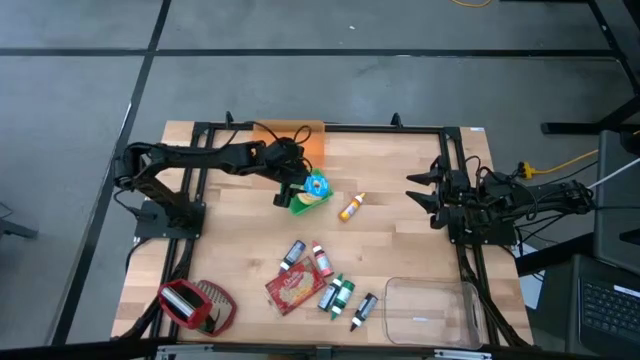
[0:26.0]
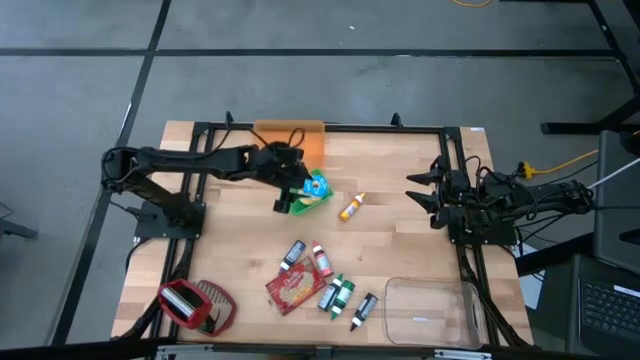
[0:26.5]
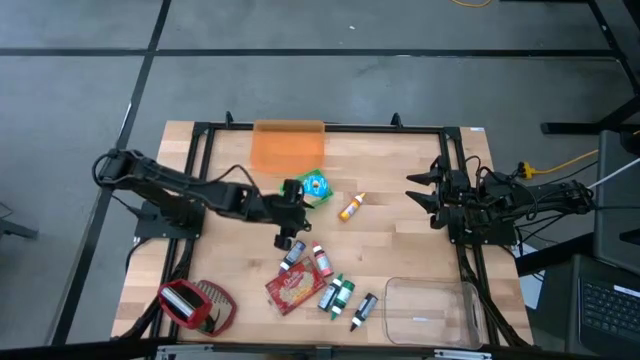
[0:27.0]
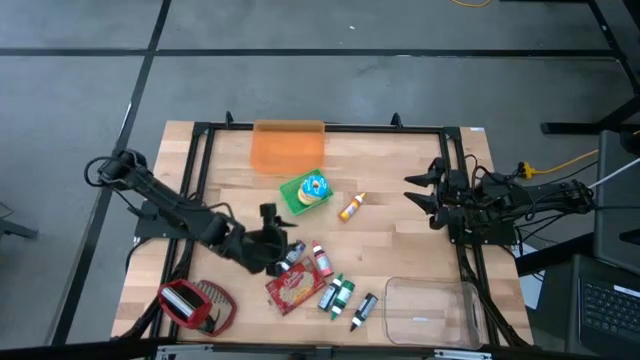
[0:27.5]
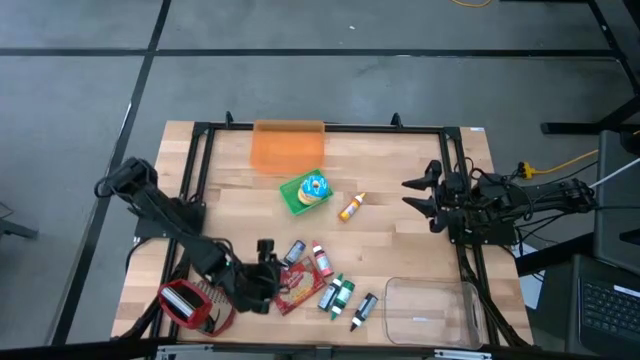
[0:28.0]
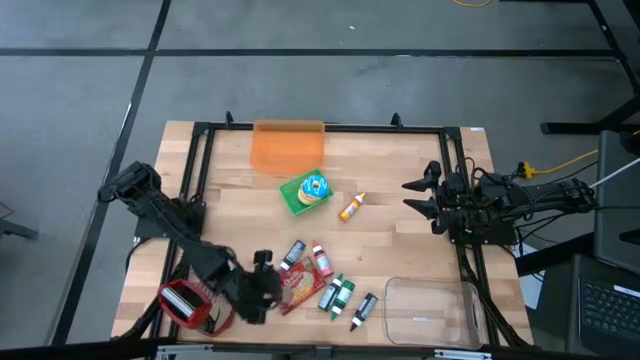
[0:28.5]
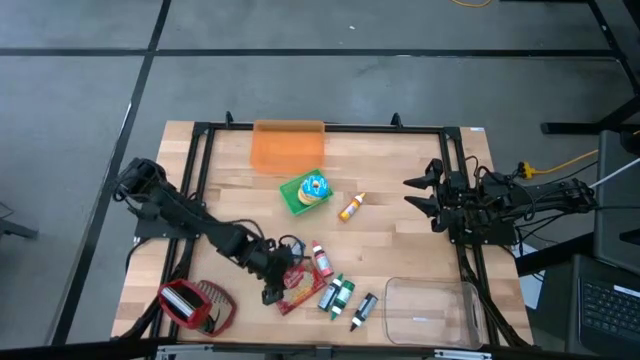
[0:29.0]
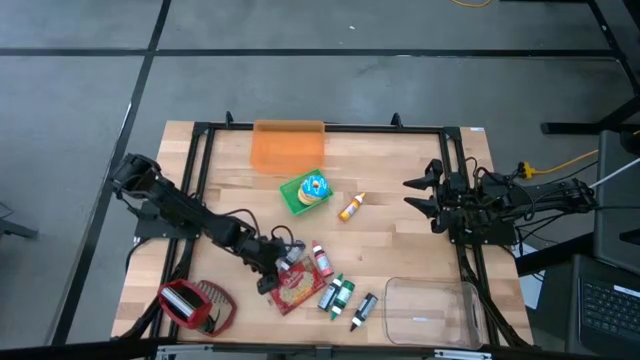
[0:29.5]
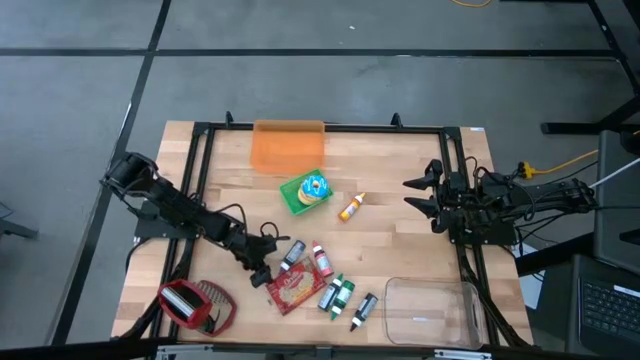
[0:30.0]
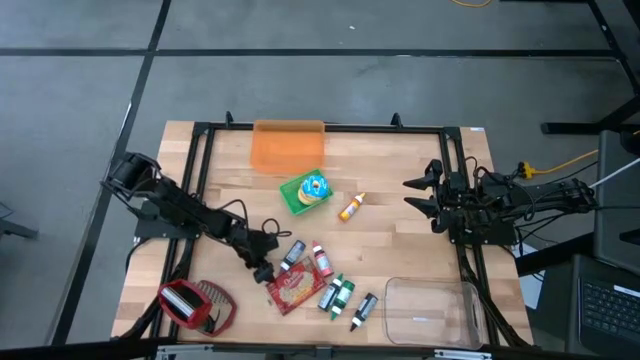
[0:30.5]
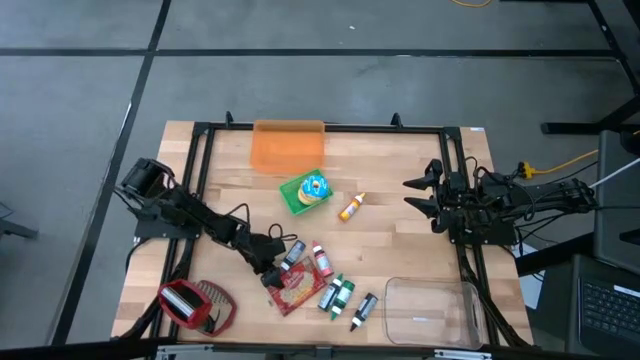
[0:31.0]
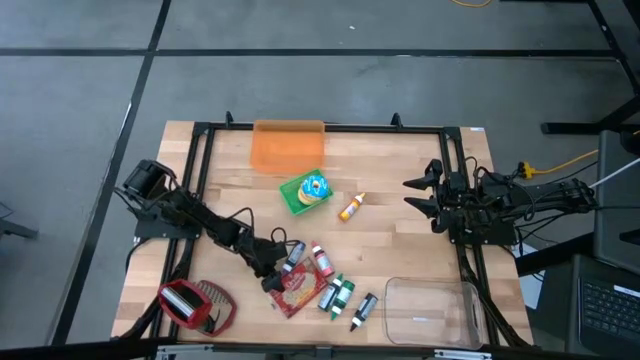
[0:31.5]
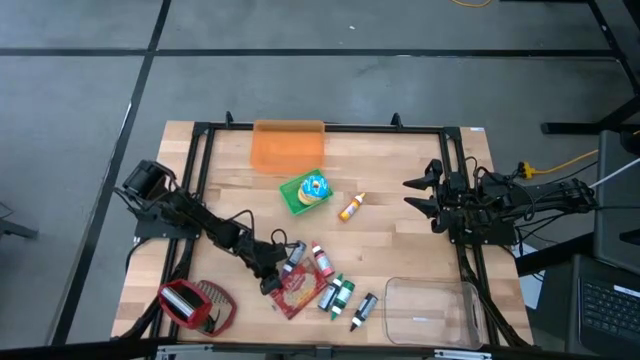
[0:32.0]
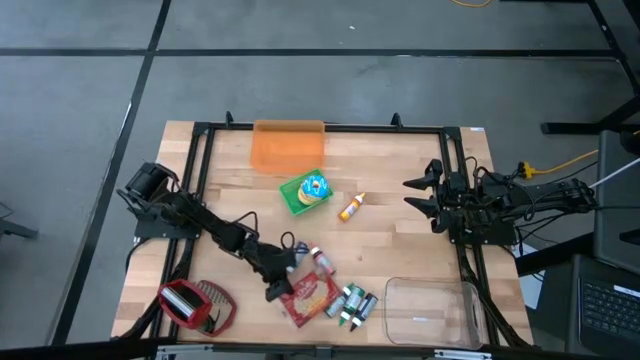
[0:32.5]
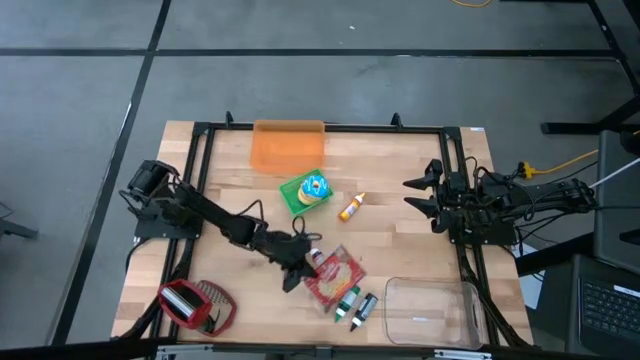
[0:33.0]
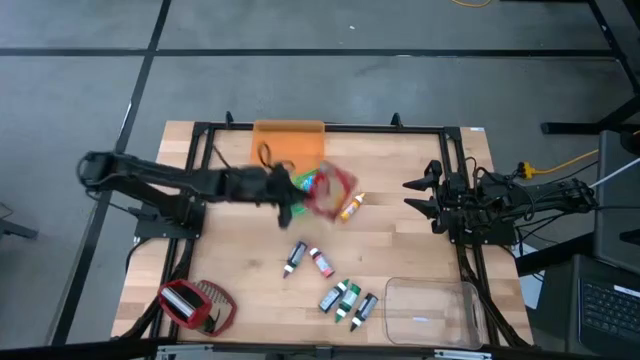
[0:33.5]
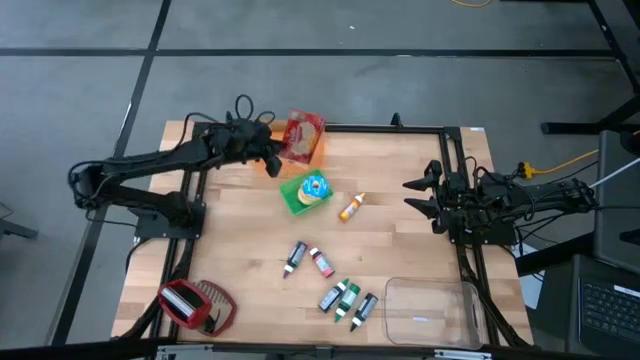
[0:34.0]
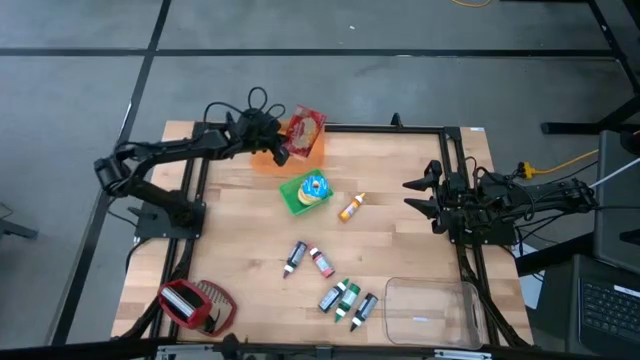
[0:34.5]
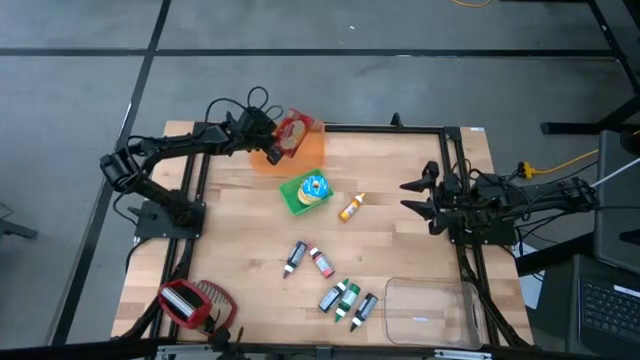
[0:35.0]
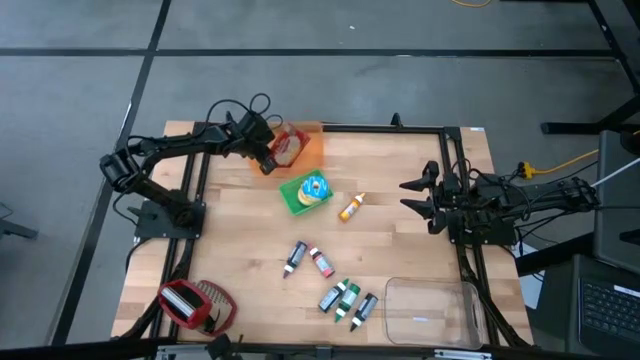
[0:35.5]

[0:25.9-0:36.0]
Put the red popcorn bag into the orange bin

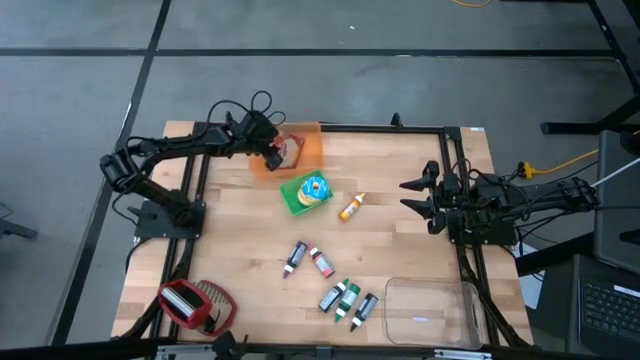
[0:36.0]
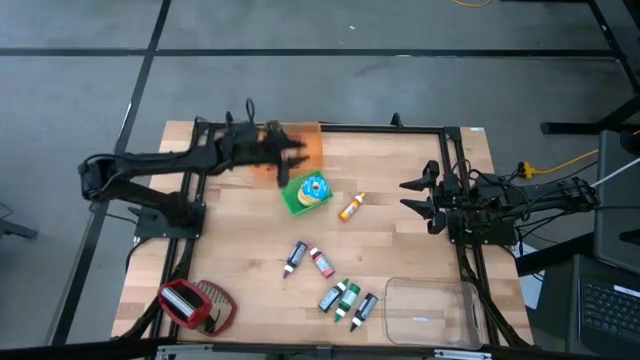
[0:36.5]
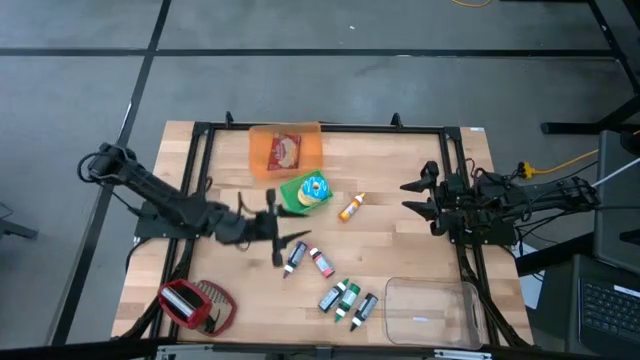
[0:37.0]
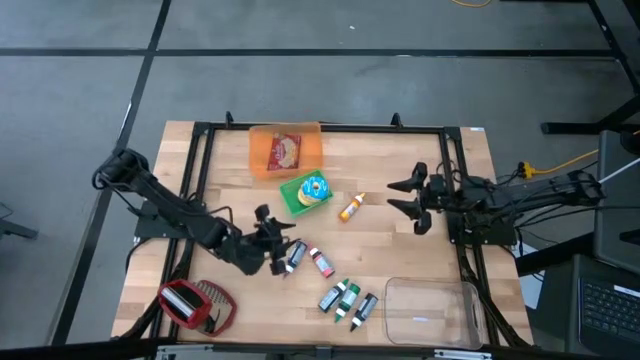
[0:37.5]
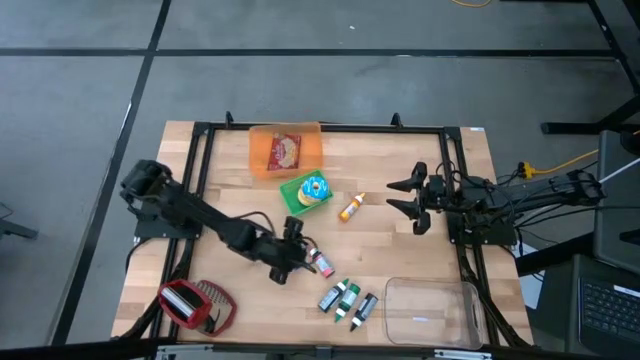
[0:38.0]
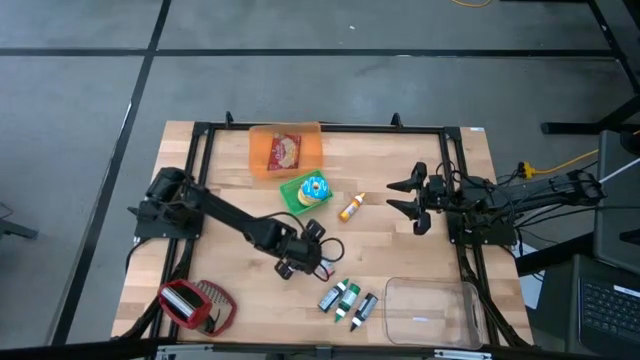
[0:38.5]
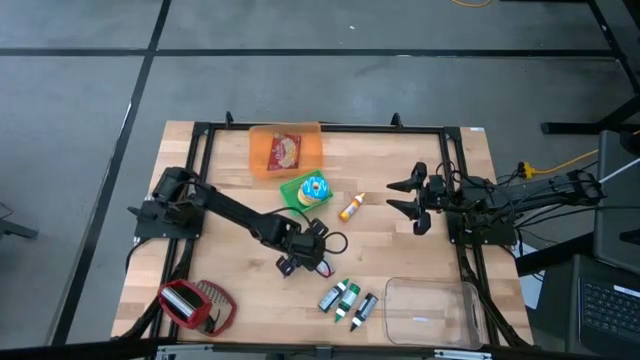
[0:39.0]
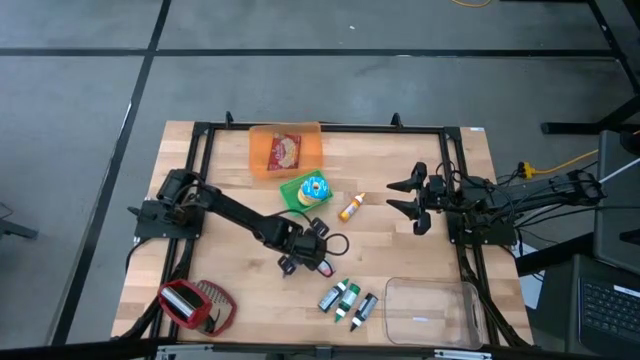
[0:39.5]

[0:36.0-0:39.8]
Put the pink food coloring into the transparent bin
